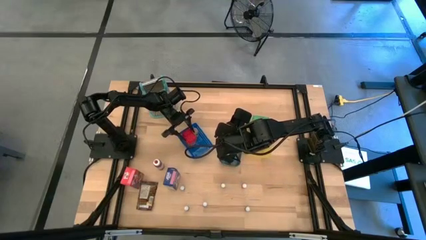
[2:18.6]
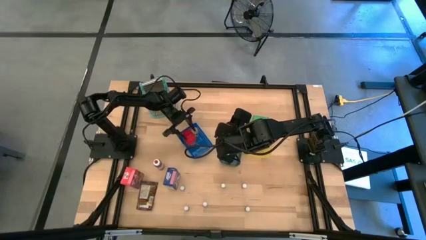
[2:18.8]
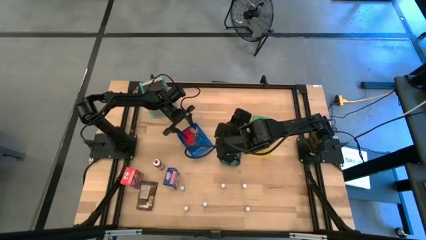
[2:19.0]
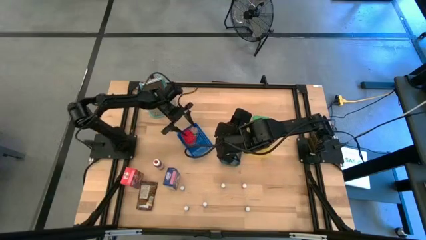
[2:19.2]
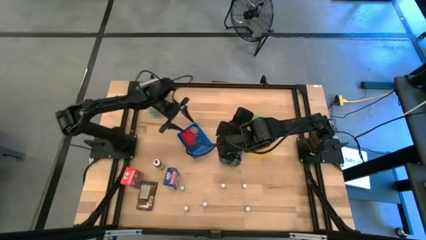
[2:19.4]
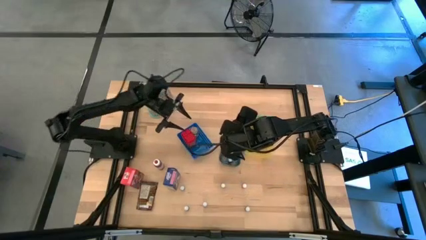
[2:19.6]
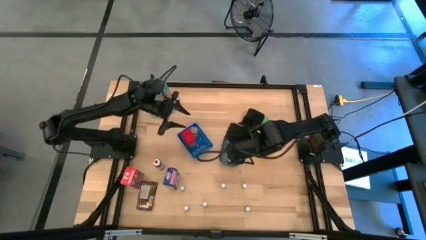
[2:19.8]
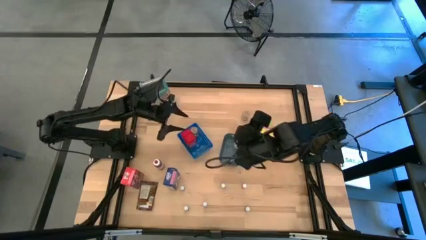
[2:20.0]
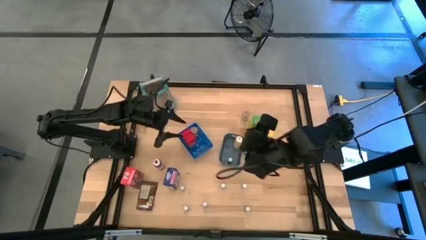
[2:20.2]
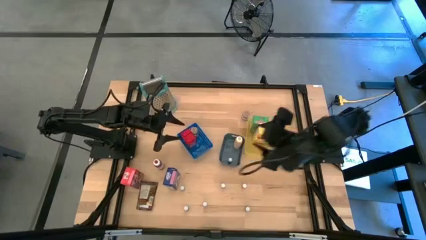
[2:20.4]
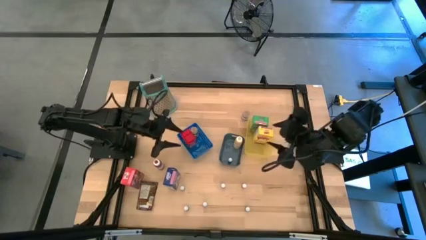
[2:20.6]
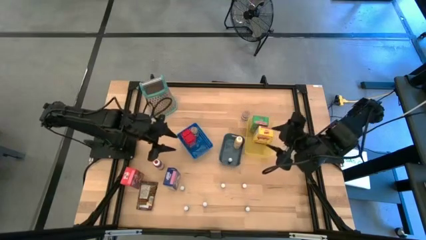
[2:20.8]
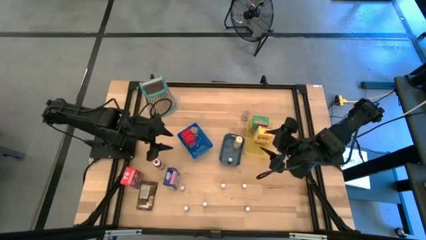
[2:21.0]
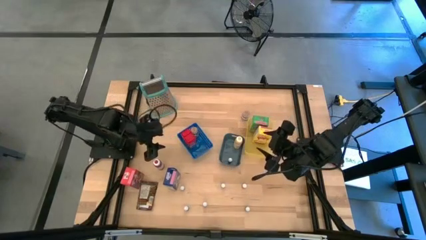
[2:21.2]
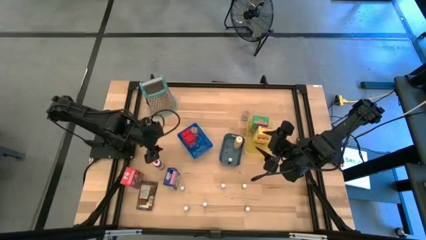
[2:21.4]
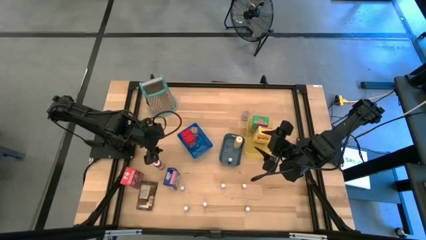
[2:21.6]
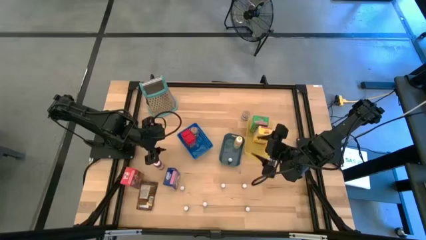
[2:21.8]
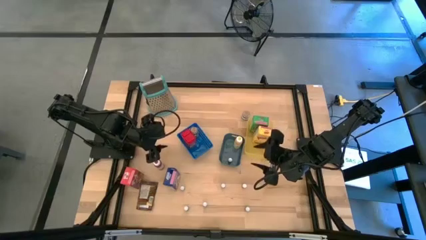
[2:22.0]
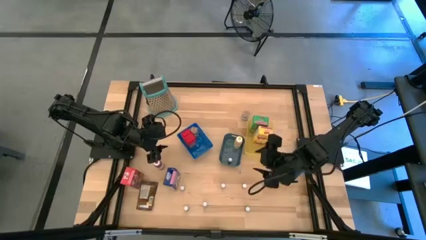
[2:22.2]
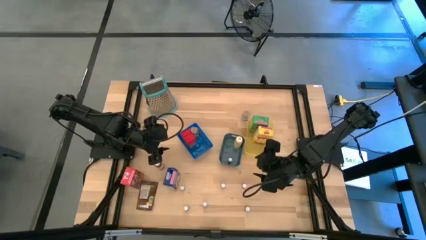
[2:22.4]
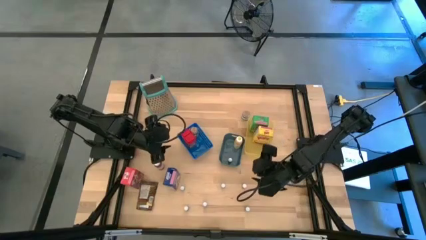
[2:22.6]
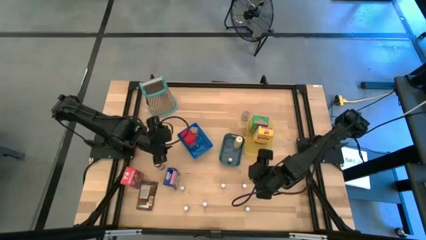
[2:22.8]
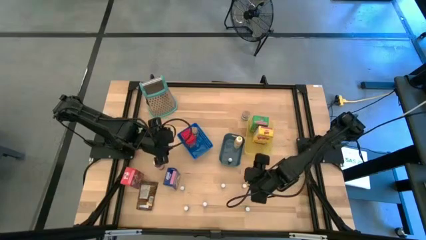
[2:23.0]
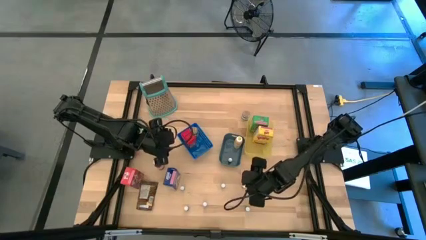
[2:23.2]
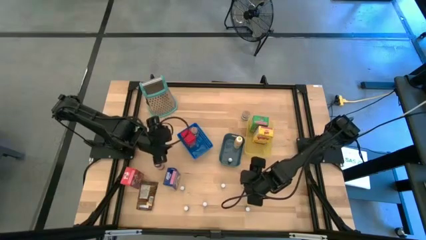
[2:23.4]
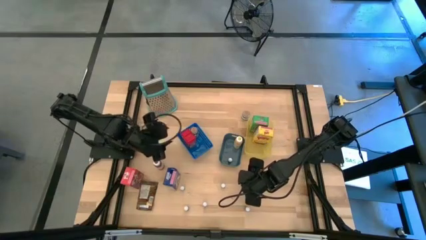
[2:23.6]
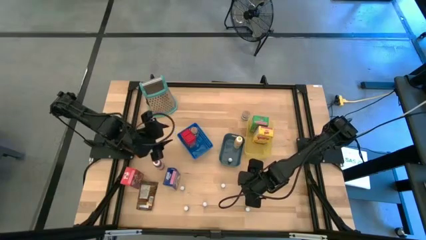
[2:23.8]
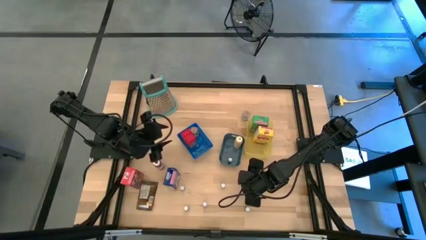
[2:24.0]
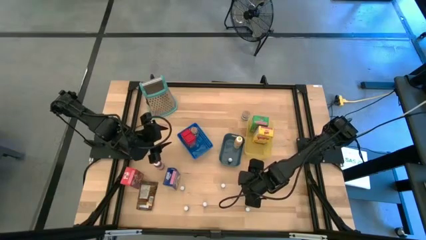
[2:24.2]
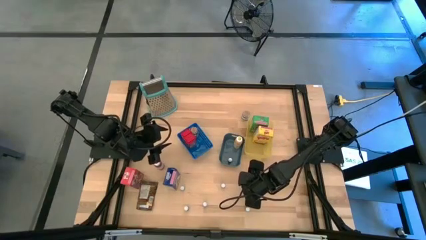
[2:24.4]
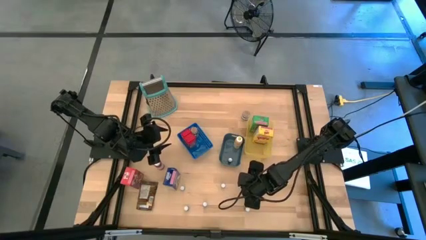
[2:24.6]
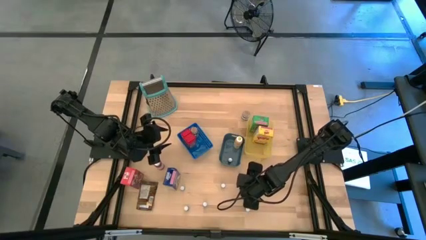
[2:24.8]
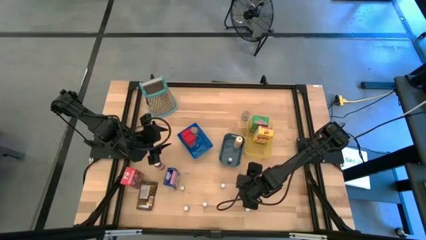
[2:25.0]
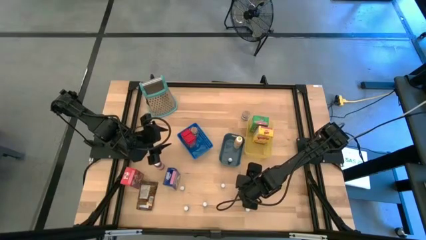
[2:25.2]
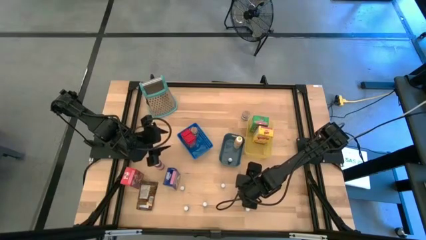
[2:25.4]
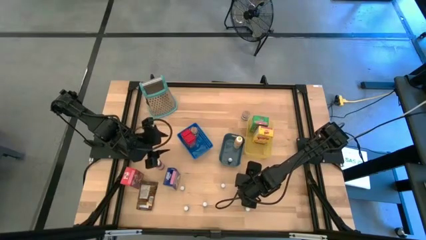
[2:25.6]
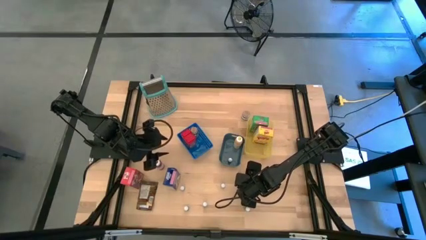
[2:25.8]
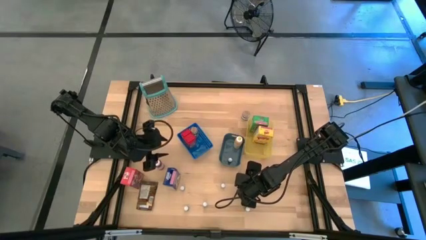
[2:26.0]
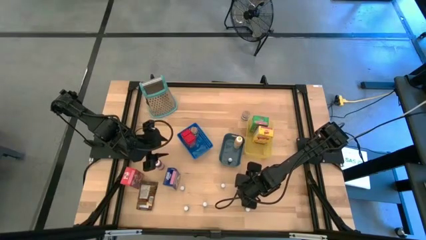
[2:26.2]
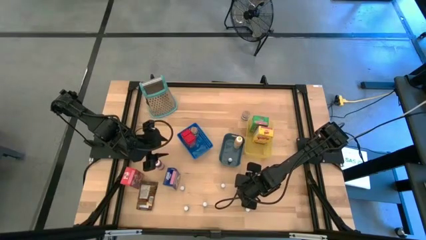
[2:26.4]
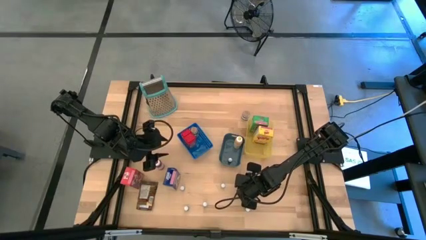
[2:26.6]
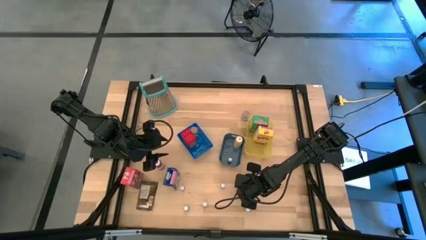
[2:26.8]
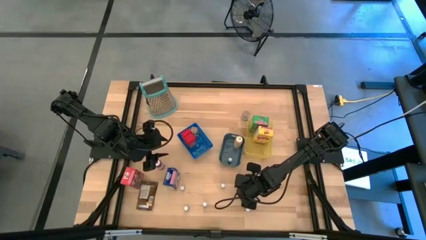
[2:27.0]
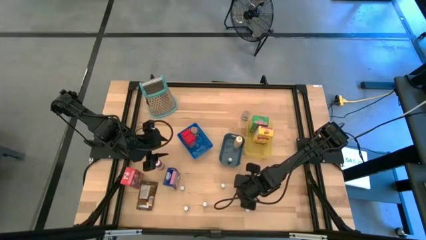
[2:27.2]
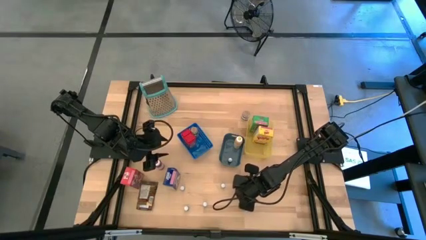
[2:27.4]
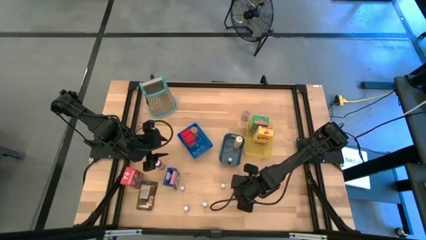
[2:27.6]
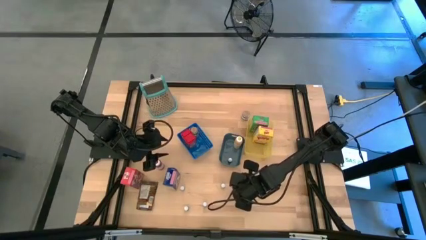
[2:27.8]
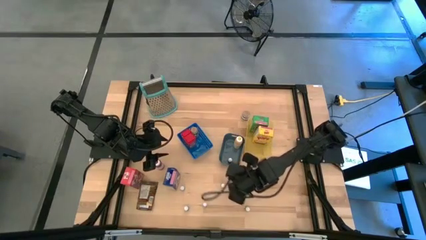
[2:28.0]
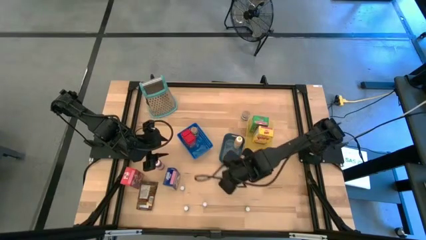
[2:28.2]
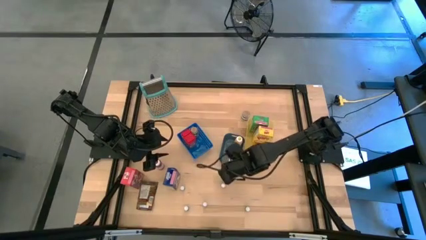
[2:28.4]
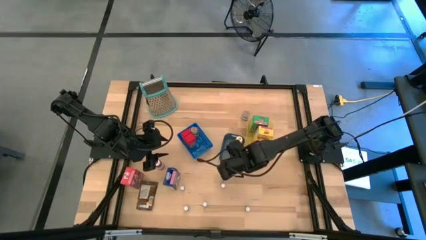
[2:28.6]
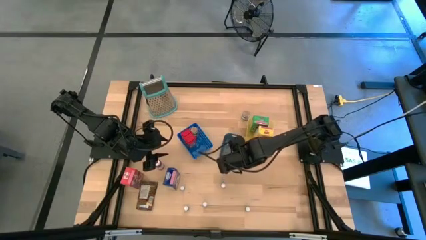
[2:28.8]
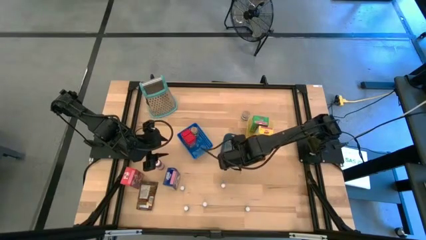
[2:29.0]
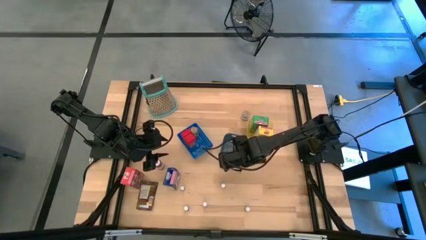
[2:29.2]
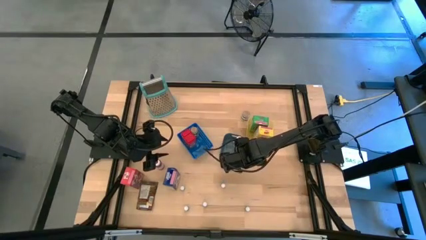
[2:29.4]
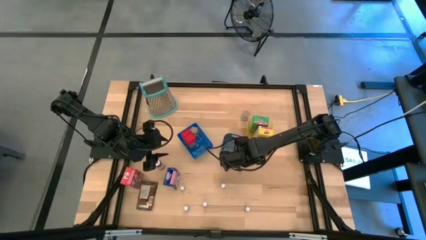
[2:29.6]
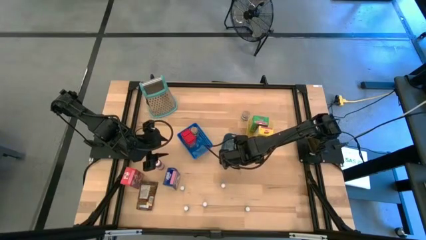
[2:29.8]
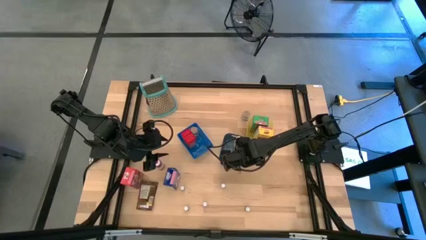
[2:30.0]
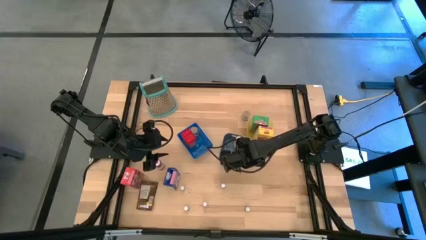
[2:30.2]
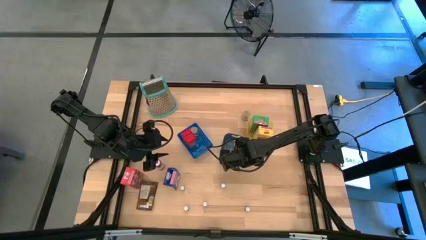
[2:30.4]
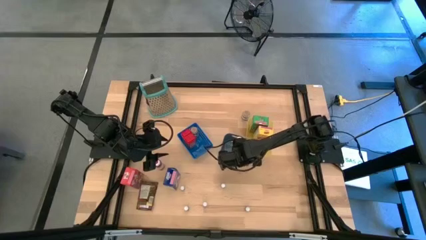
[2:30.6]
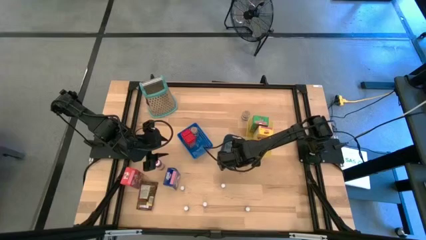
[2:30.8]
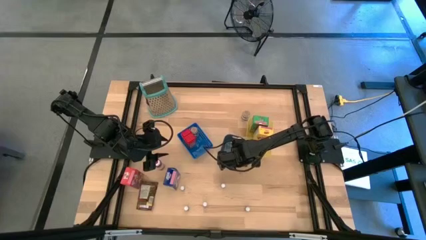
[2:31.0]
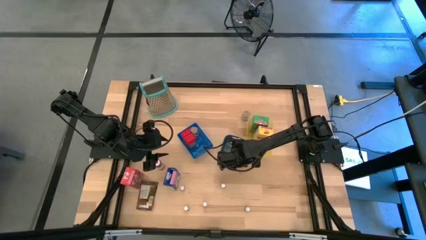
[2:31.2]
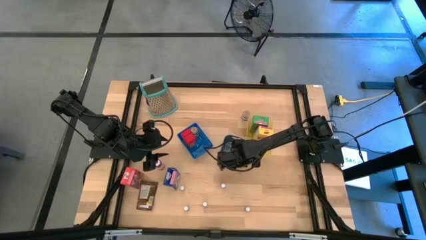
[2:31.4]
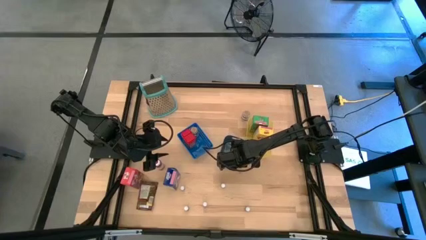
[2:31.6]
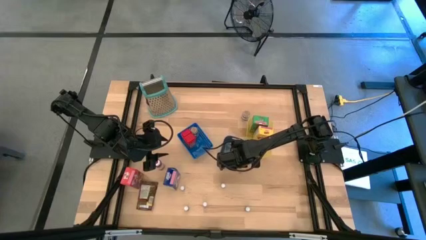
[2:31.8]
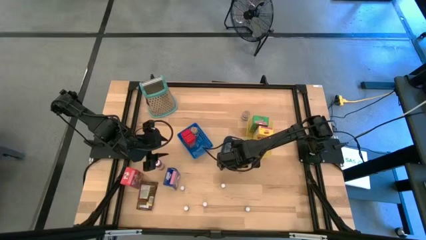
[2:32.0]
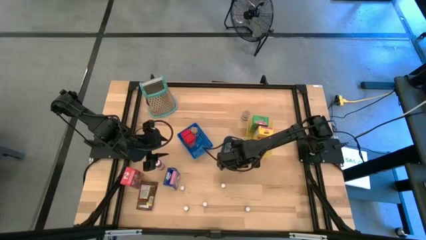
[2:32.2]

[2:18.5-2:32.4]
Task: Pick & Place Kitchen Items
Put the orange food coloring bottle into the green bin
